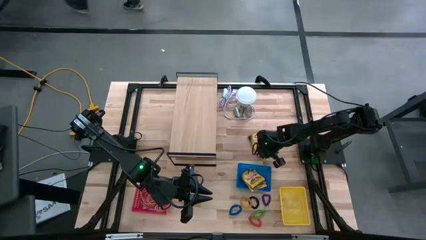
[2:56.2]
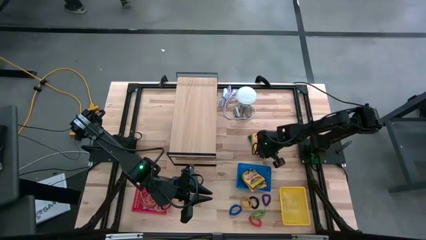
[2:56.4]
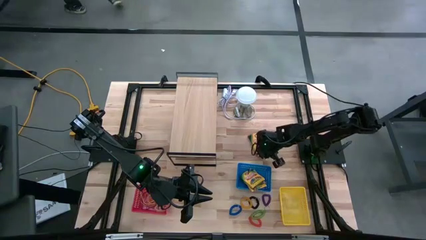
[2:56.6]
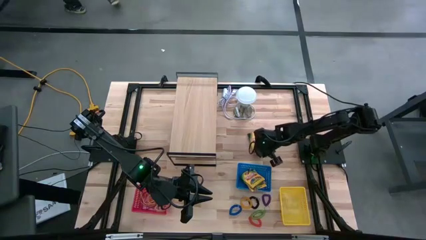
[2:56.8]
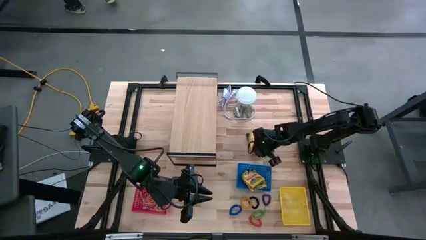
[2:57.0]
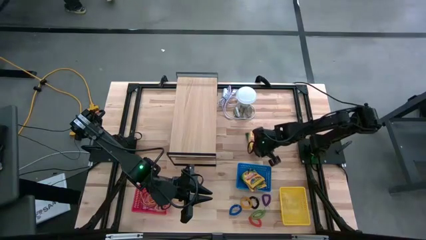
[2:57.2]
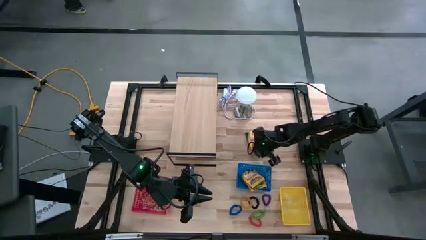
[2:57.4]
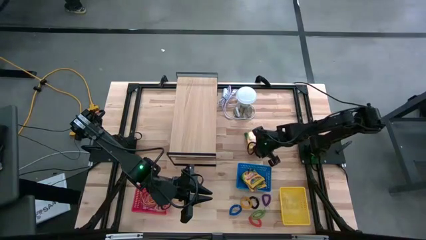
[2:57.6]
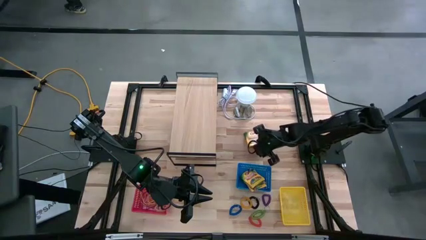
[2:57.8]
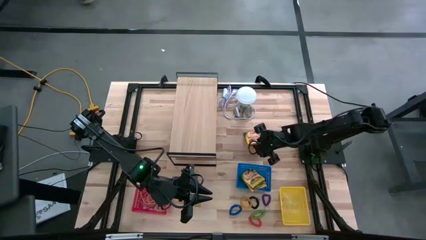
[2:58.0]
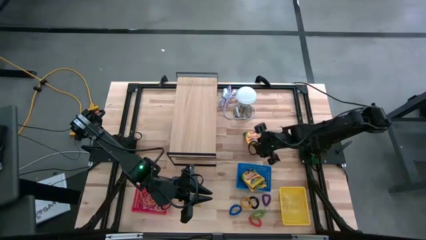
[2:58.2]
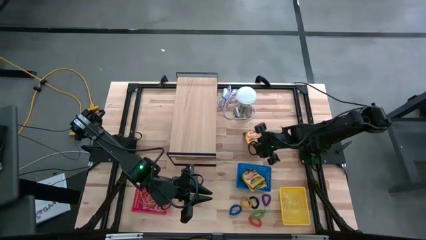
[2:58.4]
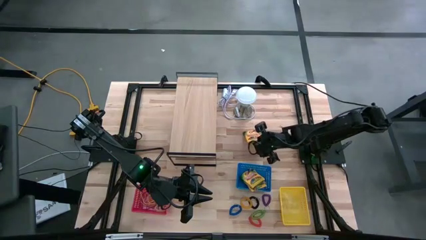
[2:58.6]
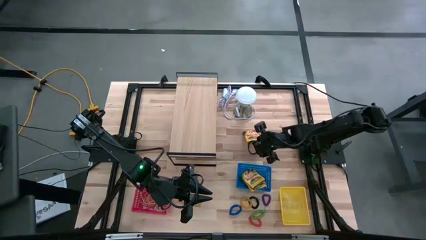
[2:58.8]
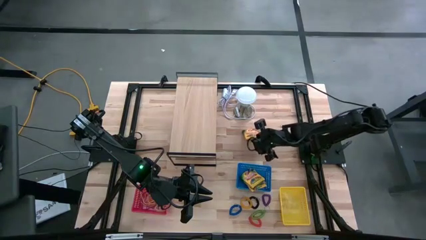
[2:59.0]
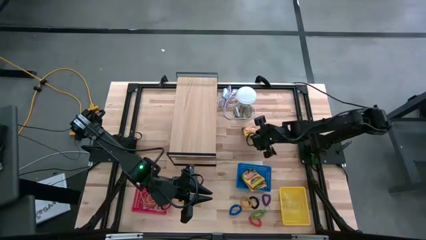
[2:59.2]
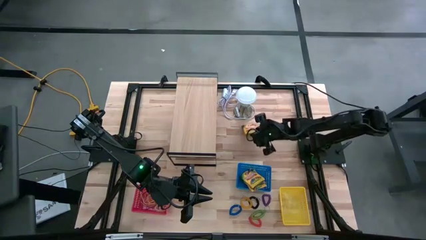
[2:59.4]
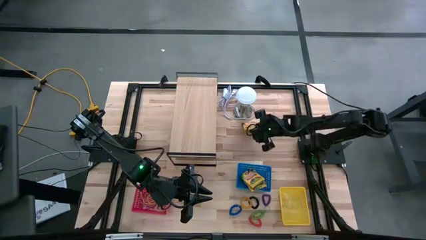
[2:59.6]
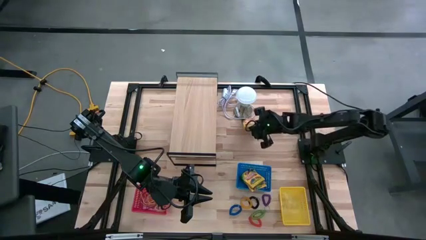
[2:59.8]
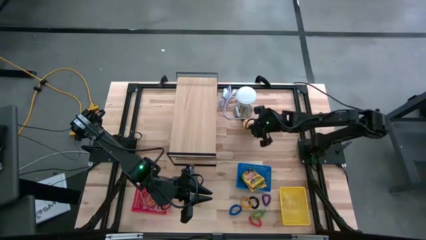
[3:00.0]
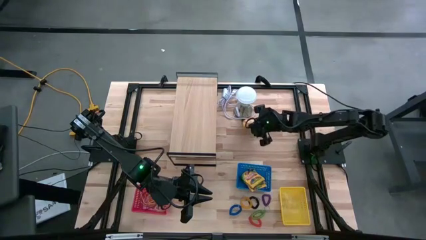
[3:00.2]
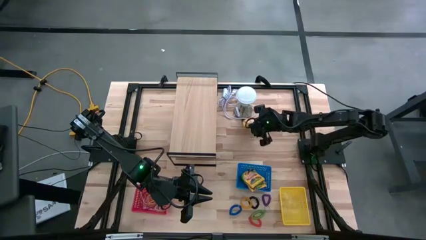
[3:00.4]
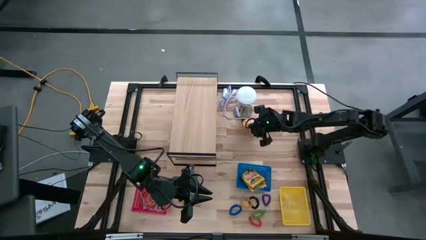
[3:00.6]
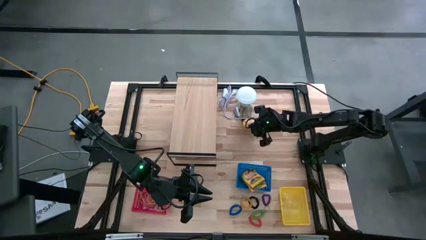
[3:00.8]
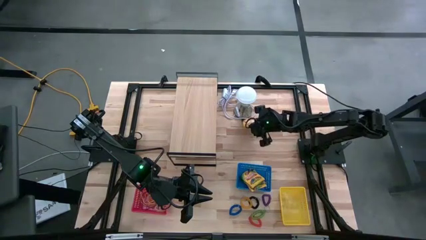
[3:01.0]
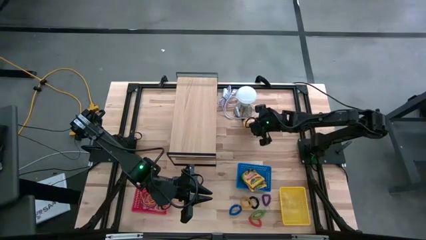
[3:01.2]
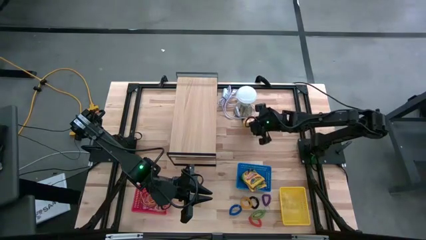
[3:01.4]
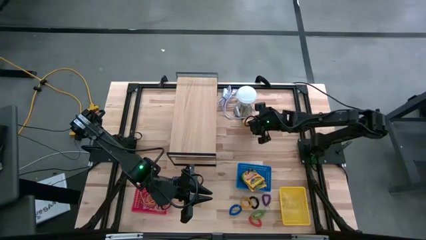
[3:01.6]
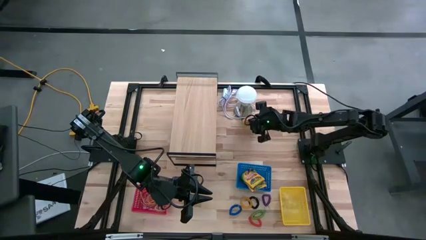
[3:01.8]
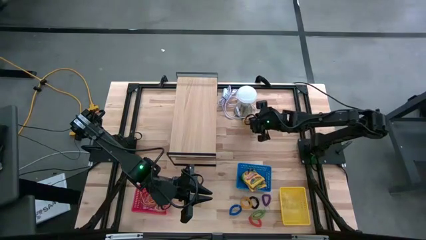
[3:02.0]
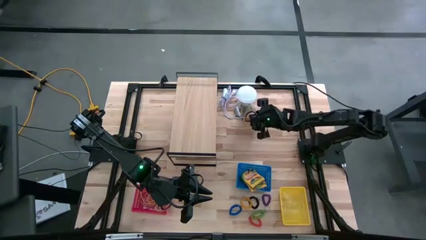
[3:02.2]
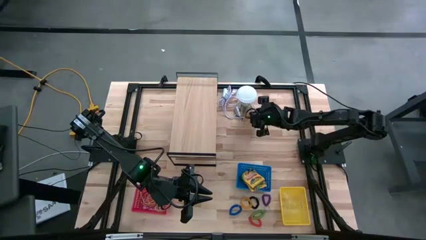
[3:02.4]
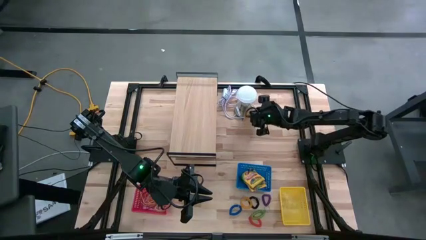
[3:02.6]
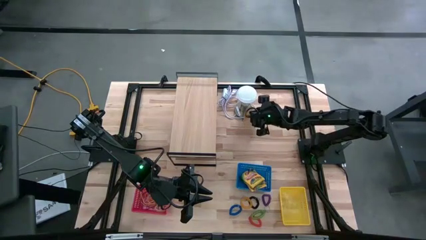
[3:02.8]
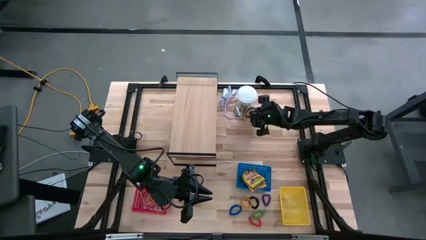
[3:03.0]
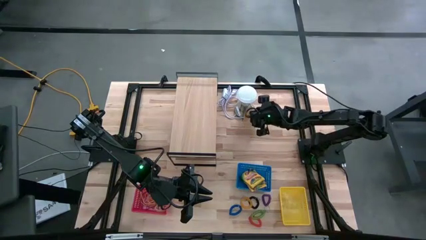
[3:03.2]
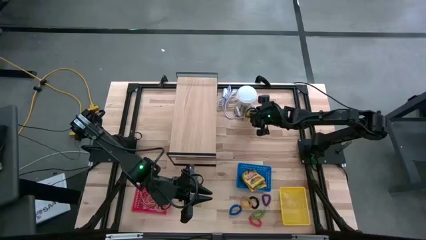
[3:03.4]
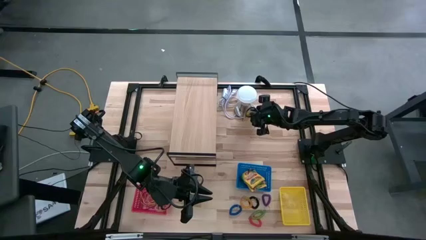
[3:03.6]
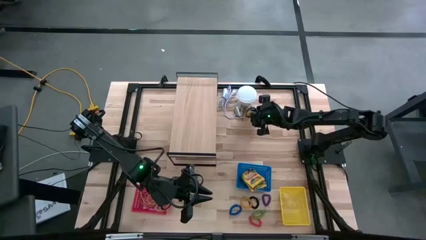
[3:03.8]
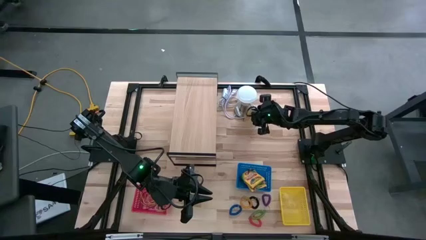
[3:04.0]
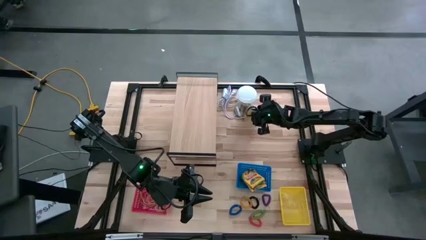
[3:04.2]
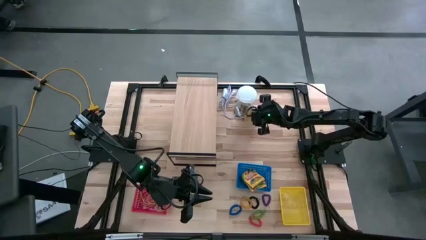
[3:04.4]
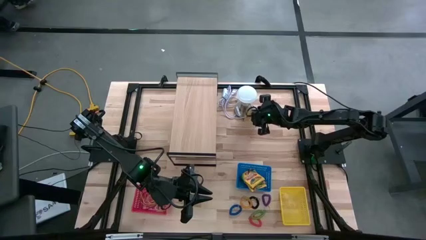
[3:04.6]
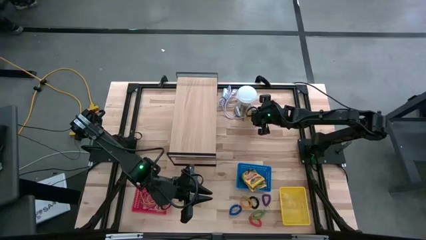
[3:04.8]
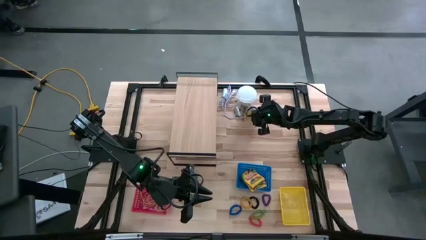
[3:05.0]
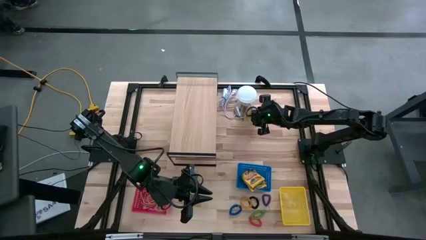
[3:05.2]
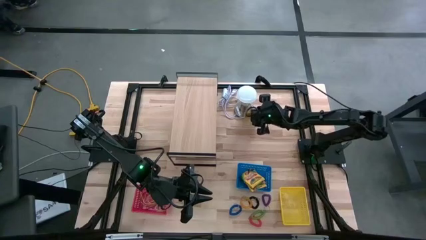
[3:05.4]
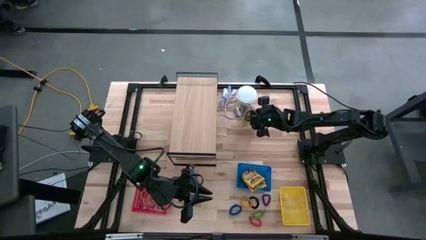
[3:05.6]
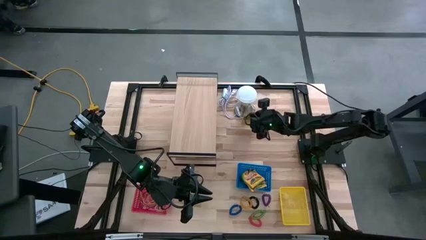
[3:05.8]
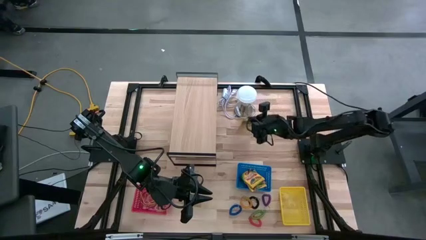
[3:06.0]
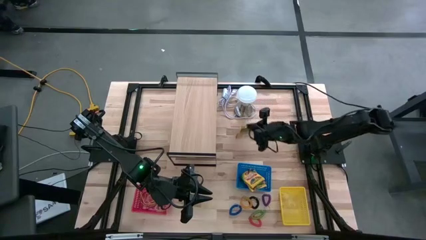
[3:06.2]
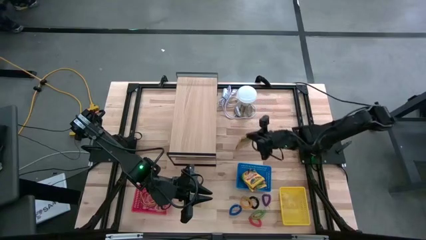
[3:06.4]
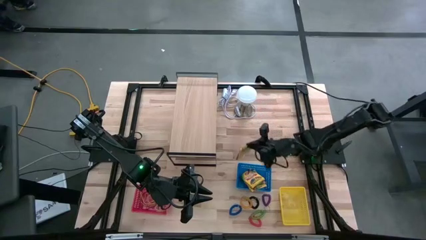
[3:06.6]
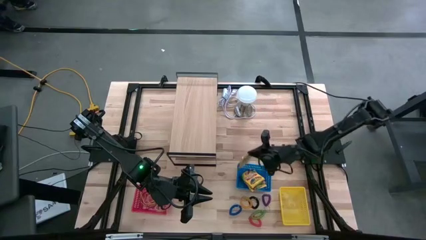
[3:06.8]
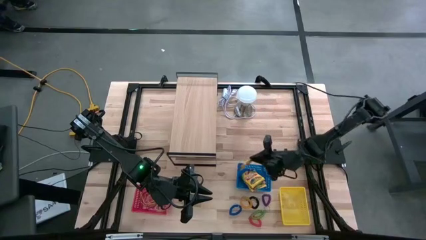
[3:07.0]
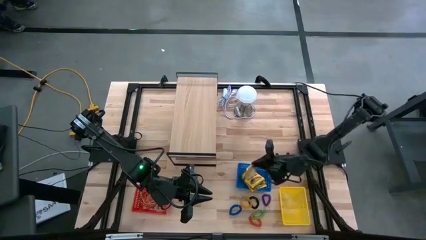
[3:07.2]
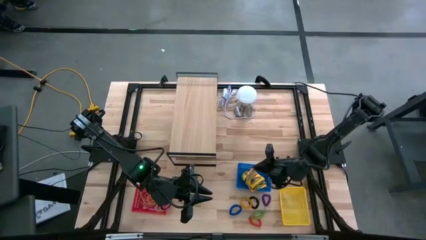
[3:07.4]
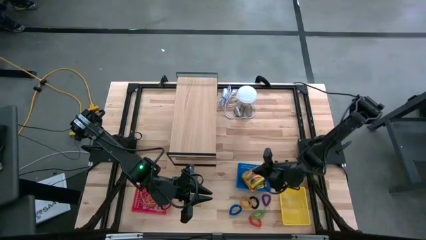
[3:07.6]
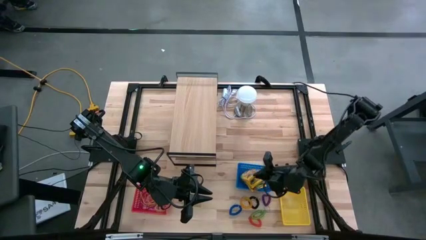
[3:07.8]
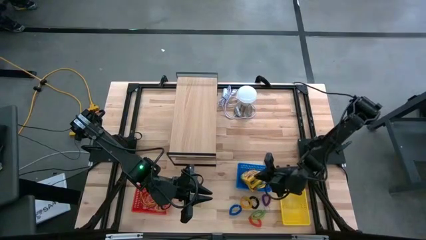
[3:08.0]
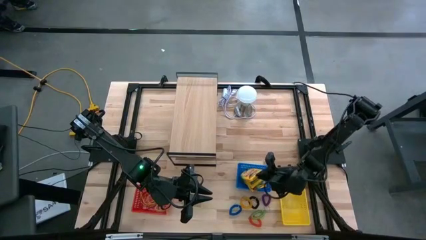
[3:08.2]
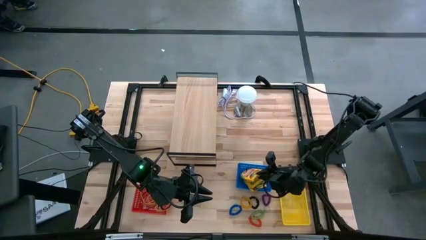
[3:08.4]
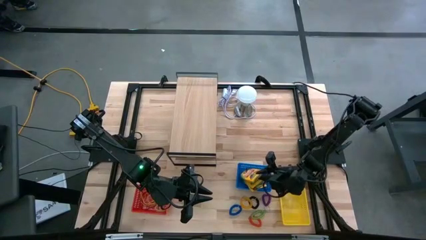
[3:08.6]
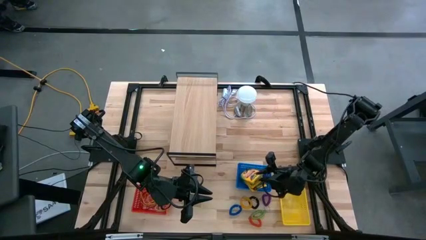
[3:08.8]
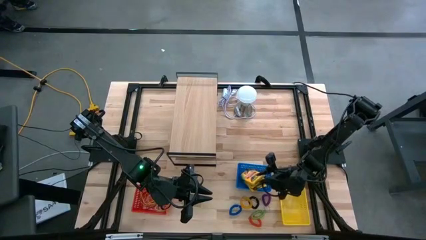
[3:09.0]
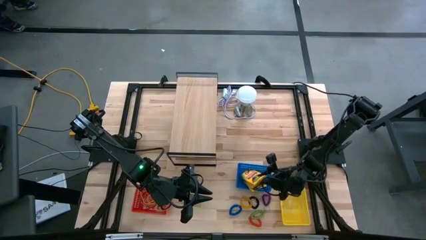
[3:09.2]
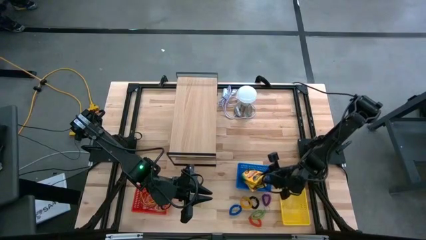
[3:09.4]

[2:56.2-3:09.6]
Task: Pick & Place Office Desk Supplies
Put the yellow crayon box into the blue bin

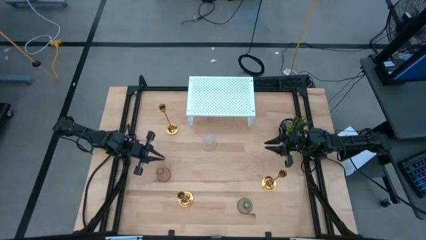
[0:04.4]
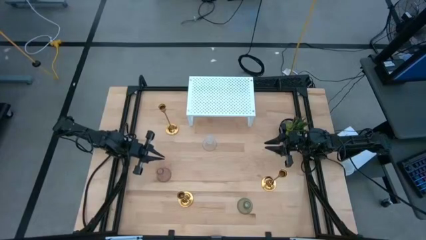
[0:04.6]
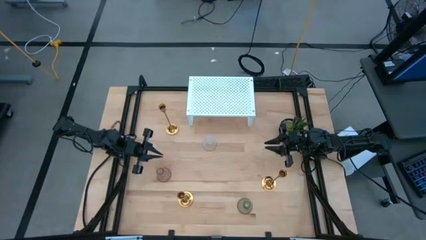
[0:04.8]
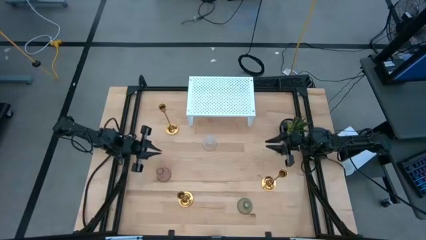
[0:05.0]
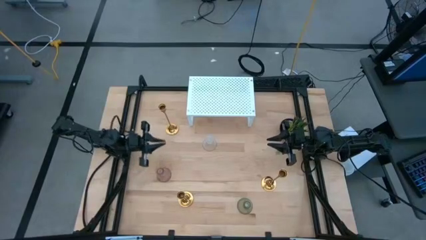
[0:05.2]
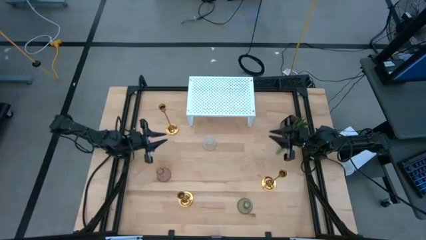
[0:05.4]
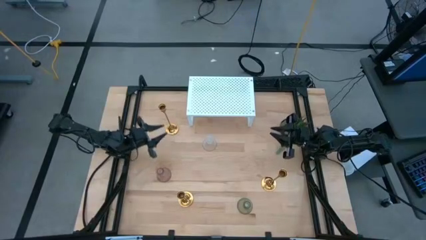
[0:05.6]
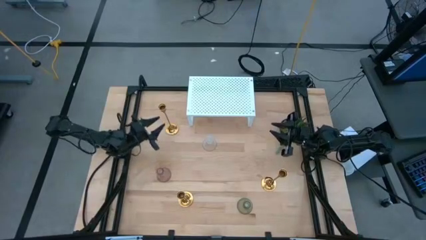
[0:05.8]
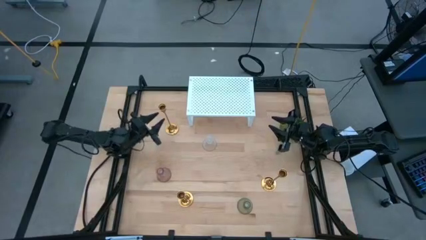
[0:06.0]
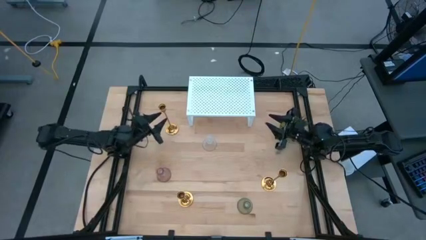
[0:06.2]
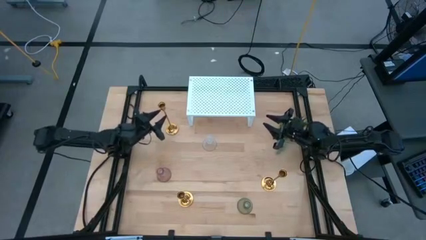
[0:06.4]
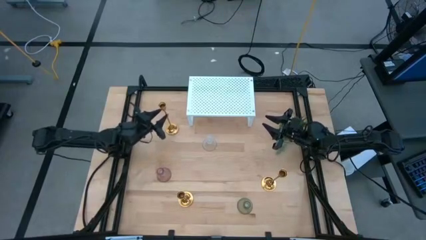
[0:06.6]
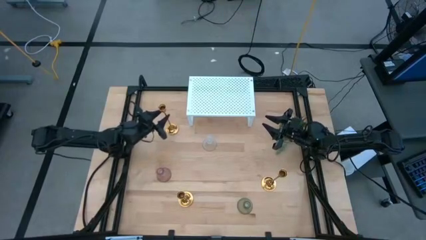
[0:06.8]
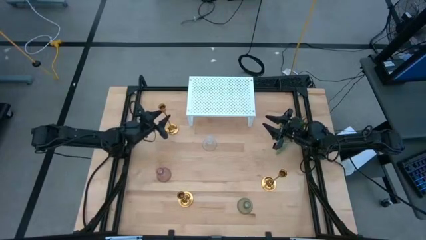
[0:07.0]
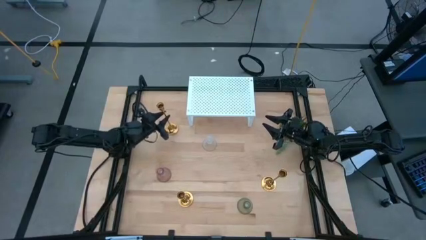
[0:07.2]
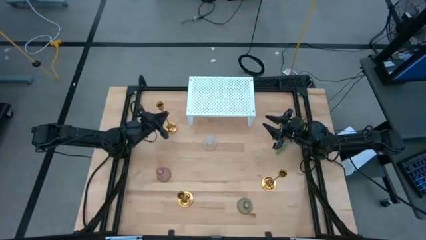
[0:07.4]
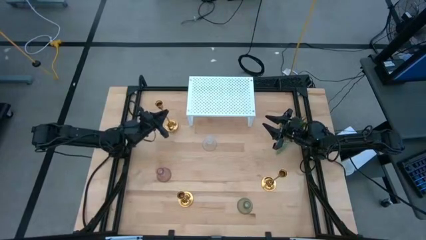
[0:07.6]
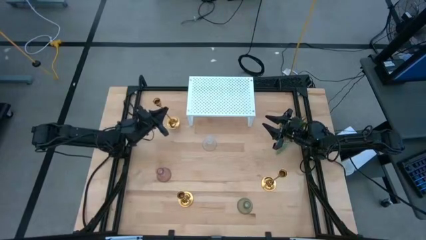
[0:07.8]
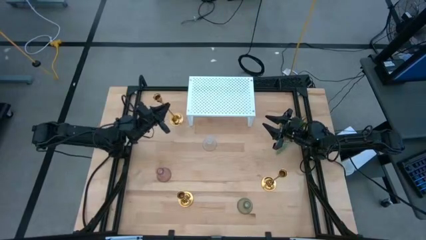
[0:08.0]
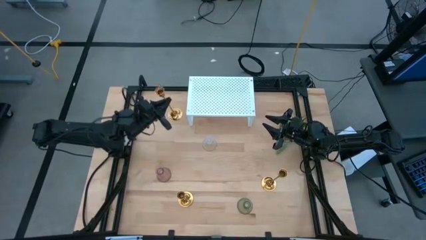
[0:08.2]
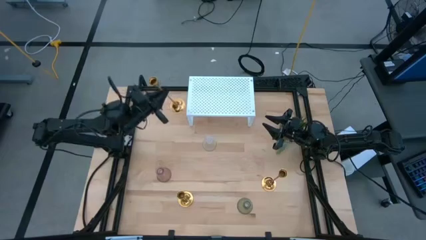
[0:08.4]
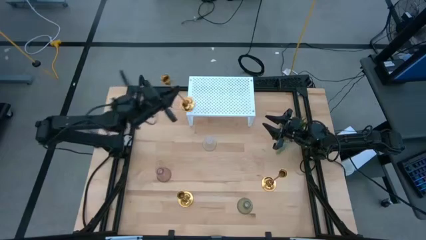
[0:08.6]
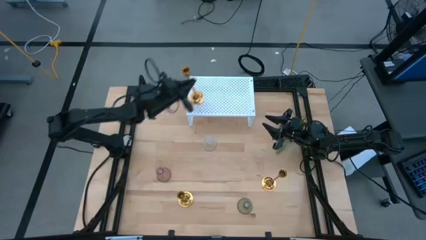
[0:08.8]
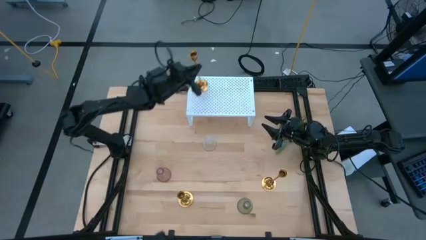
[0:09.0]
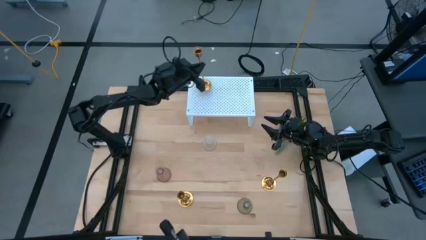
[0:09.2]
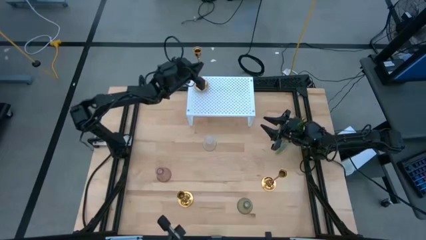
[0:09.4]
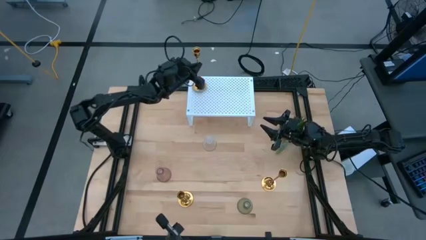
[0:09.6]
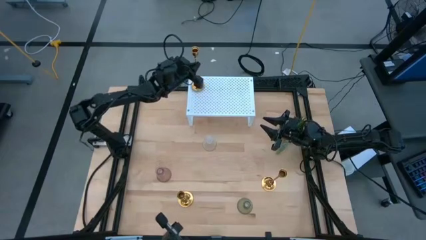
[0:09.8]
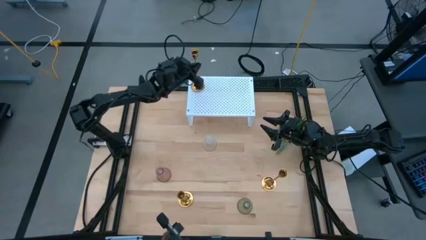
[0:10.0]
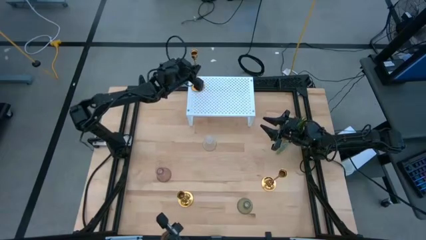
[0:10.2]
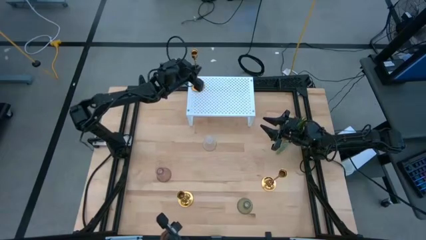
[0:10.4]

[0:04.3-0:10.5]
Task: Pick & Place candle stick holders
Put the top left gold candle holder on the shelf
